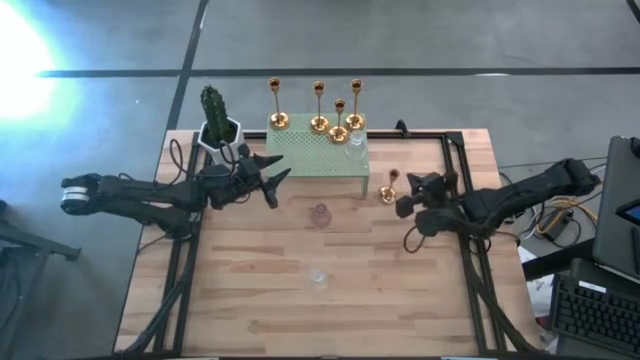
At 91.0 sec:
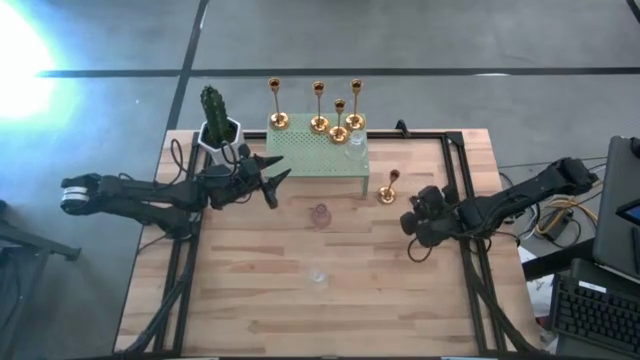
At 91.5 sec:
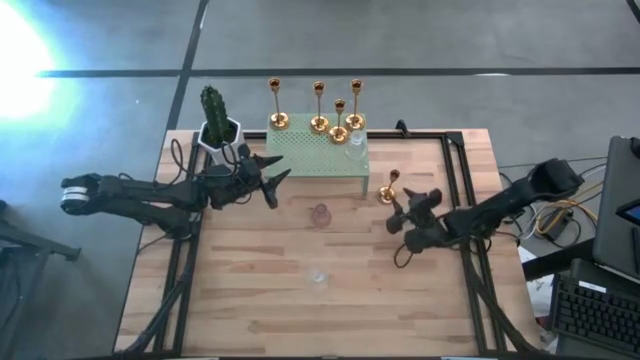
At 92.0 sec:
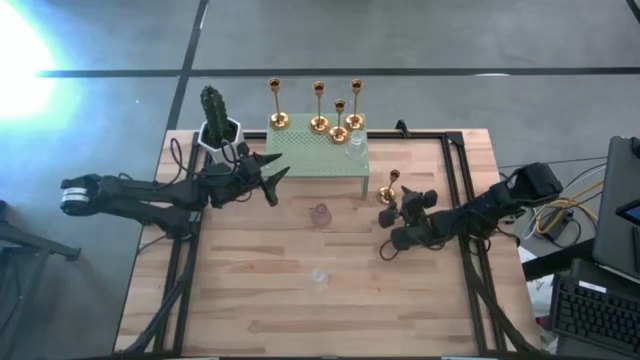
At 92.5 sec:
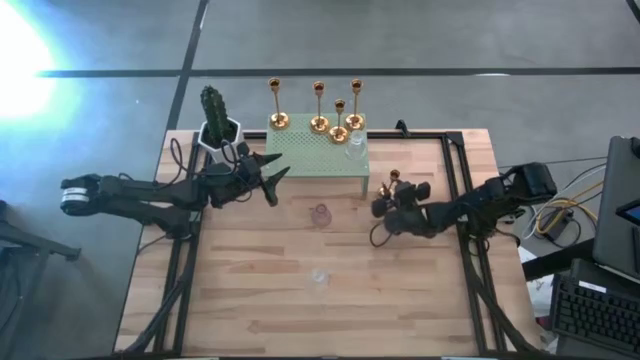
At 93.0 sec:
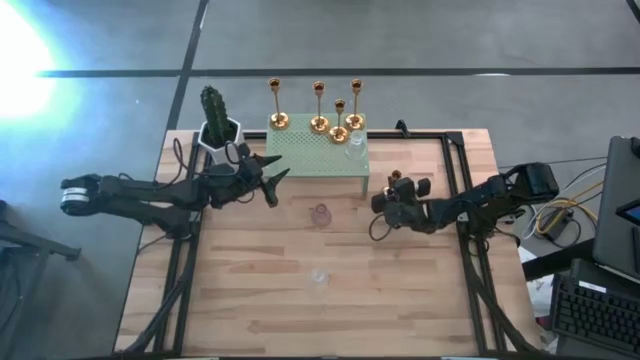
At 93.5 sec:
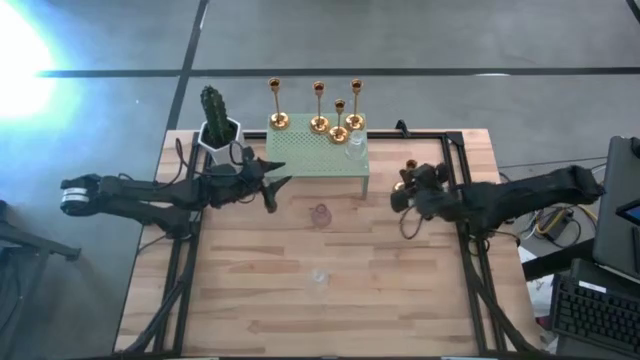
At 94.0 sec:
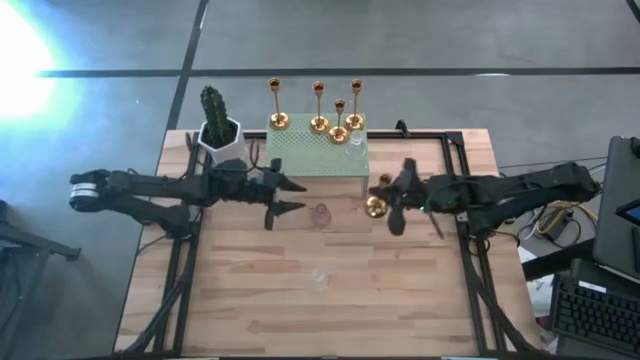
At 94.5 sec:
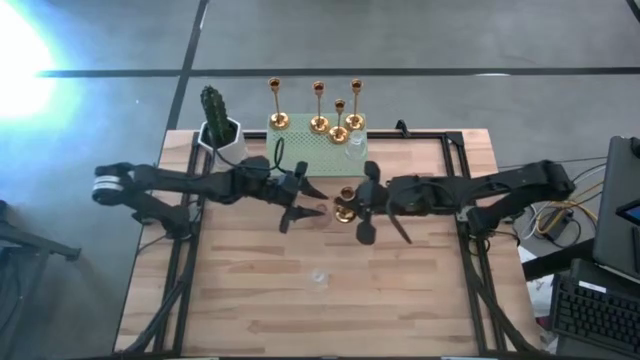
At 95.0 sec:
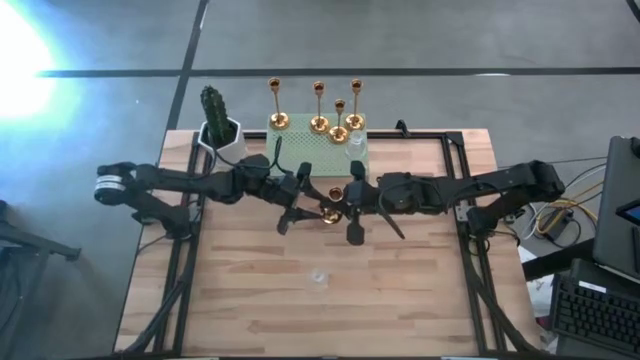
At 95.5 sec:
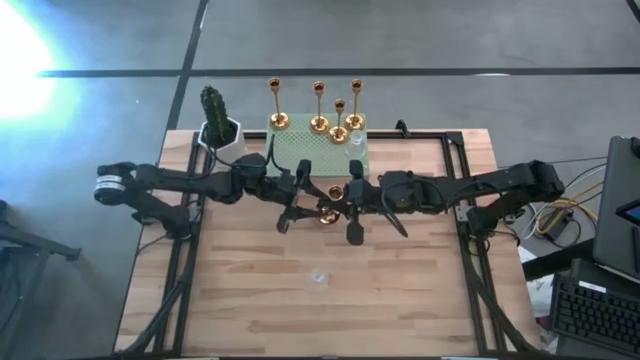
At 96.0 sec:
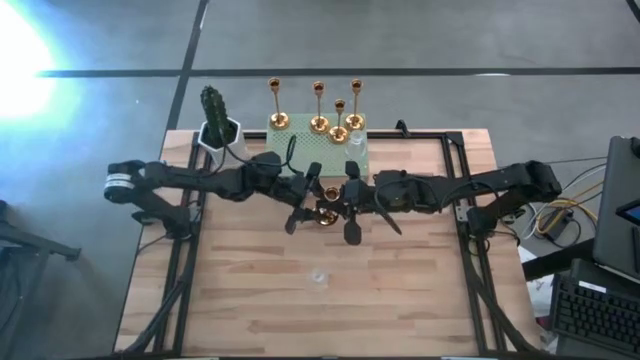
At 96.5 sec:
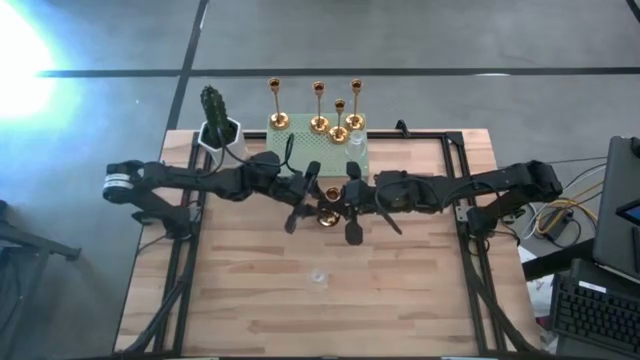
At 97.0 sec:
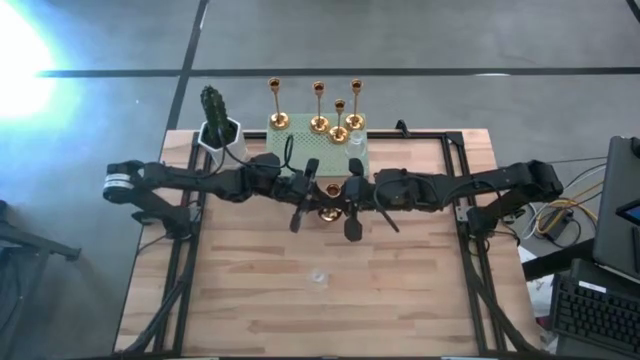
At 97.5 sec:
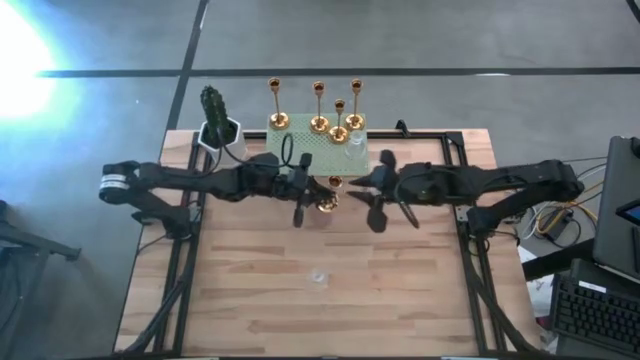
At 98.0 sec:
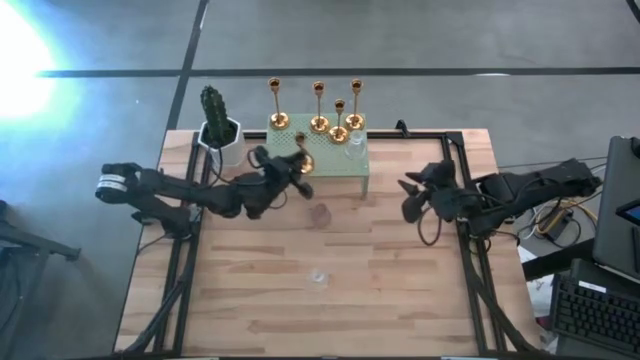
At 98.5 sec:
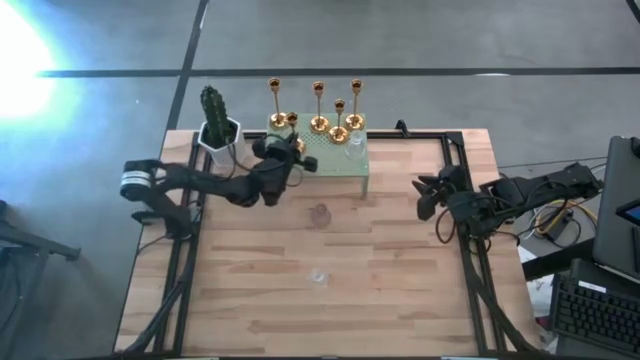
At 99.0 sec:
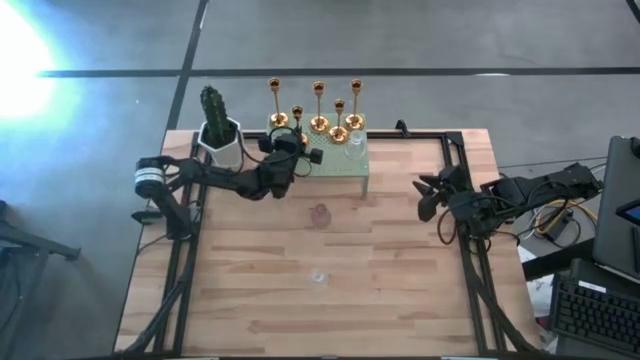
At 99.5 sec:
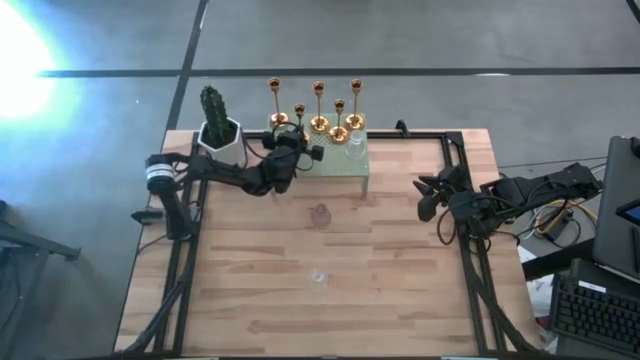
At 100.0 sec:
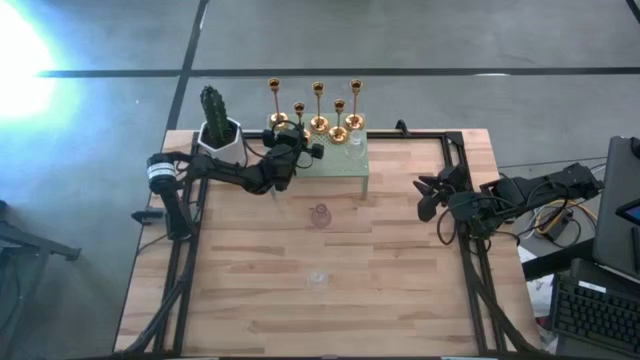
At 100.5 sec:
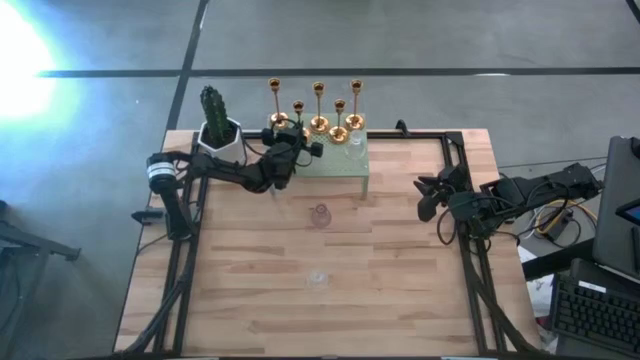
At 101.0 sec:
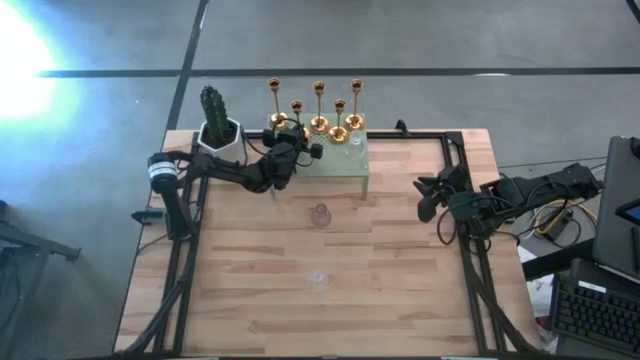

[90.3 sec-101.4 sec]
Task: Pick & Place candle stick holders
Put the gold candle holder on the shelf

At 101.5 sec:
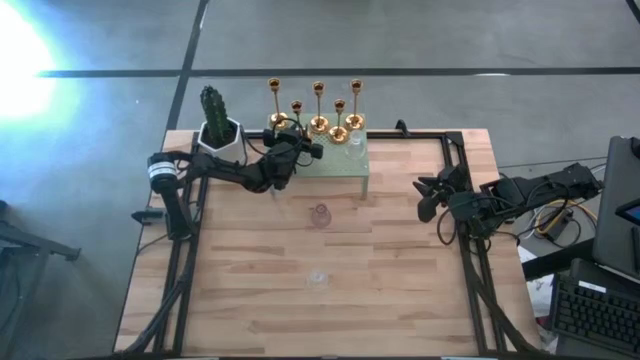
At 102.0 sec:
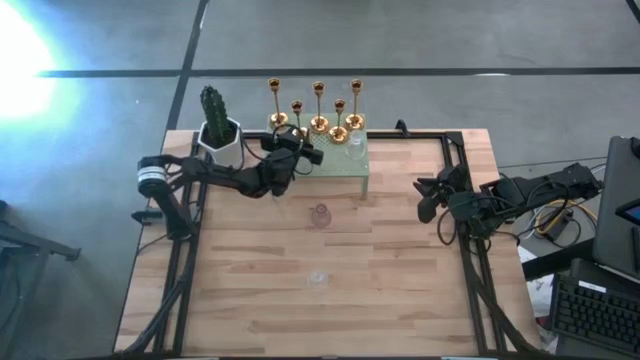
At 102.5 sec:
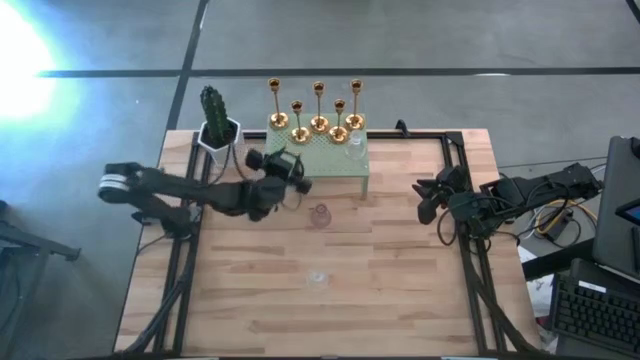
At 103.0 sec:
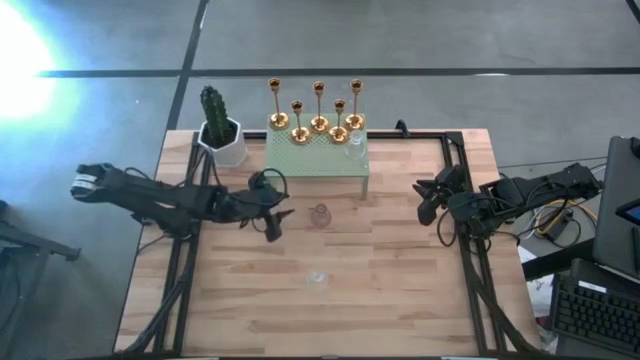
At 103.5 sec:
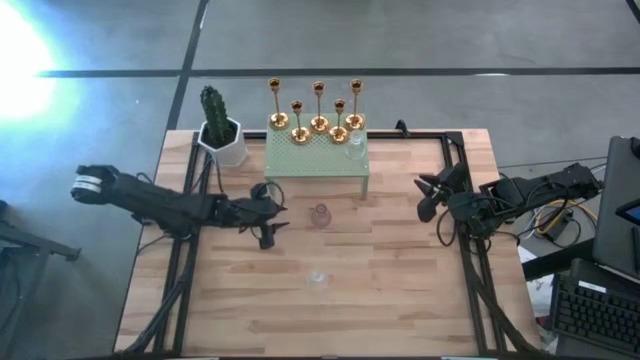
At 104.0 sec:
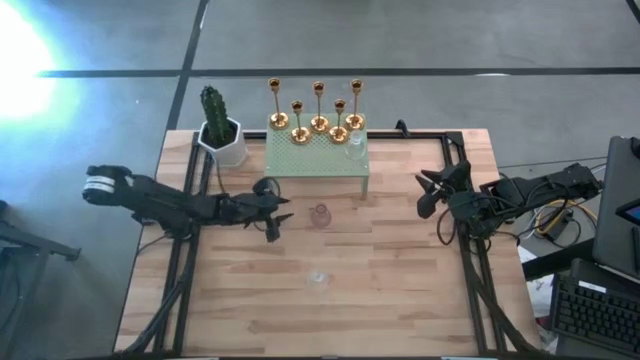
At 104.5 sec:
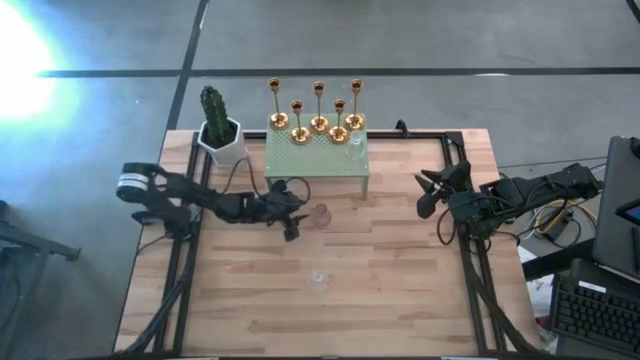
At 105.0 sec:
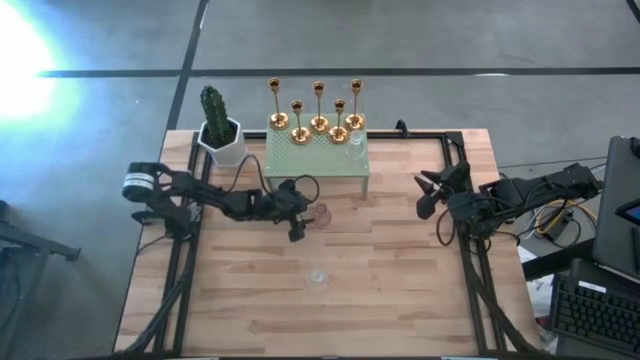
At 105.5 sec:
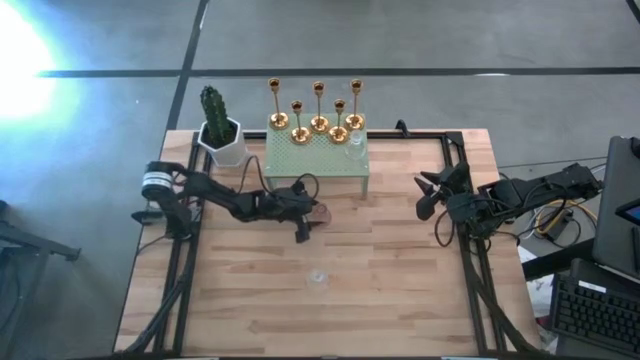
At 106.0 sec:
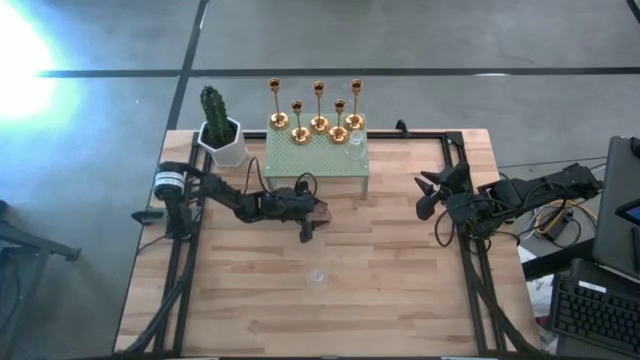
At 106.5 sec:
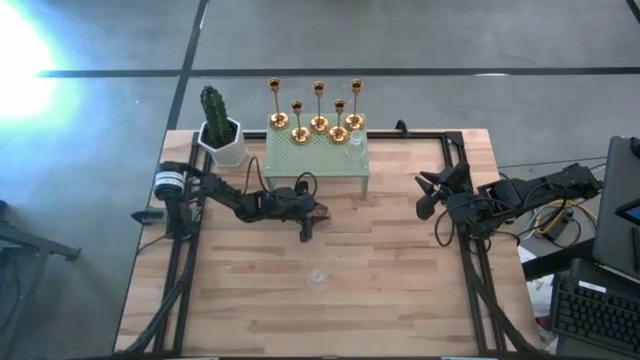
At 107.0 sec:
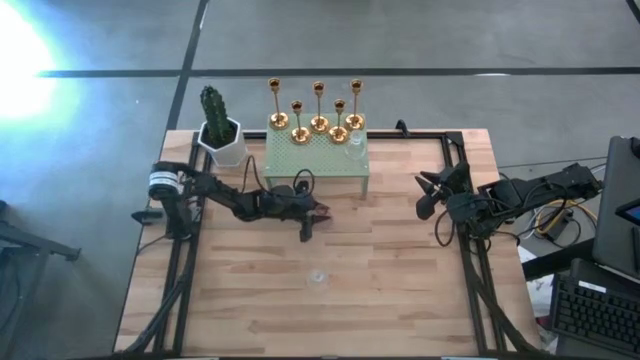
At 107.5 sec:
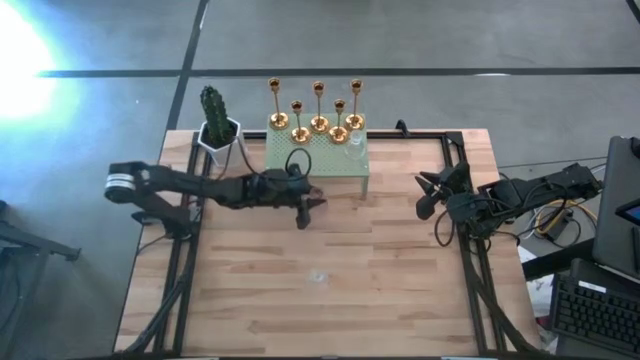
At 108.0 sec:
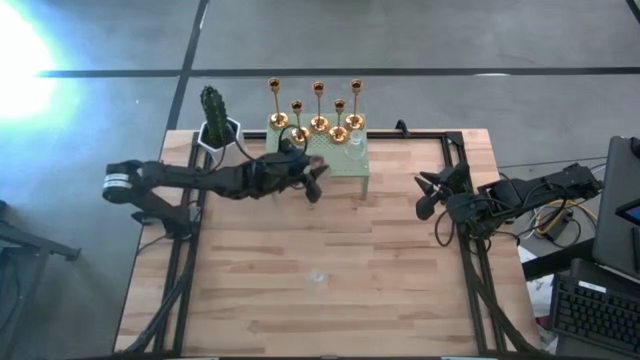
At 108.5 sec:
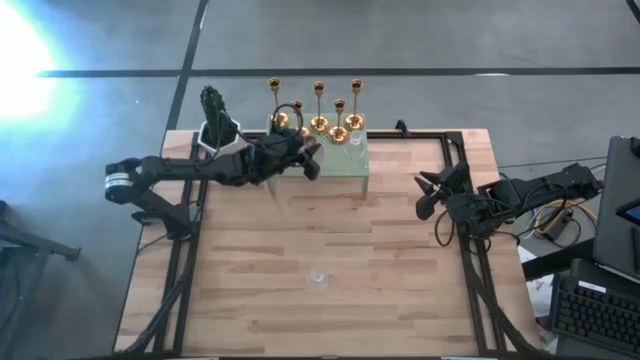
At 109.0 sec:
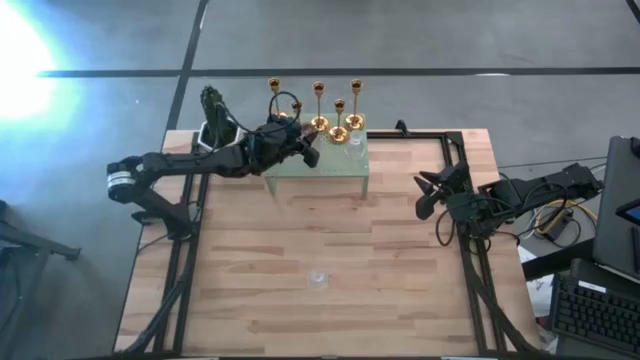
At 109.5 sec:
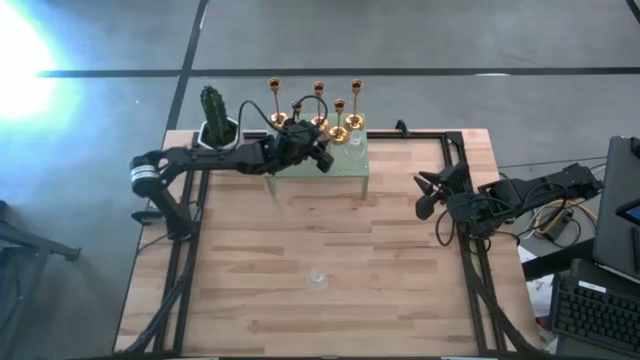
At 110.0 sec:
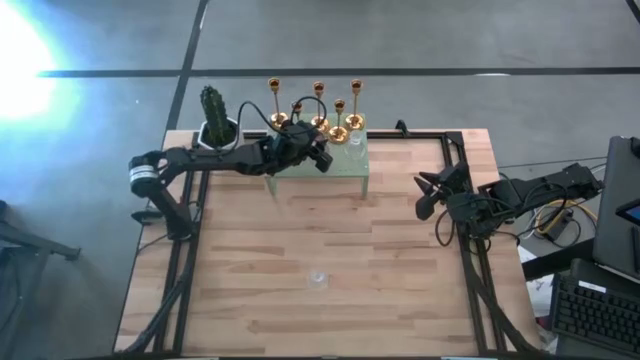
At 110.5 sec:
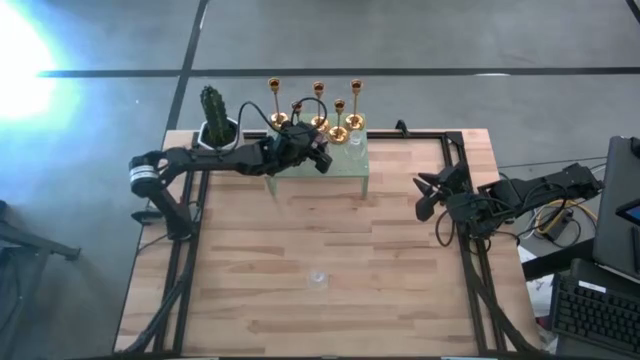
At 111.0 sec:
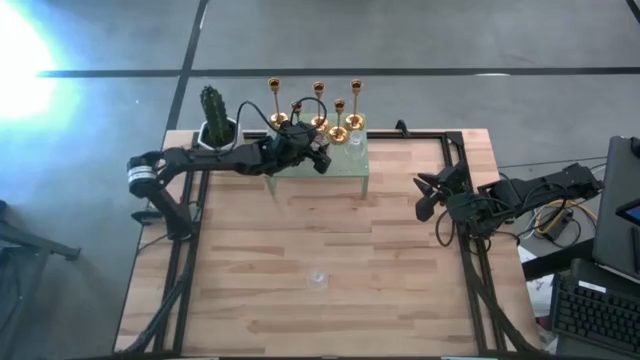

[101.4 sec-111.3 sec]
Put the pink candle holder on the shelf
